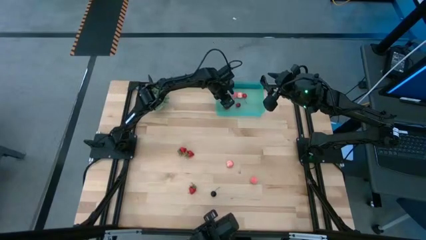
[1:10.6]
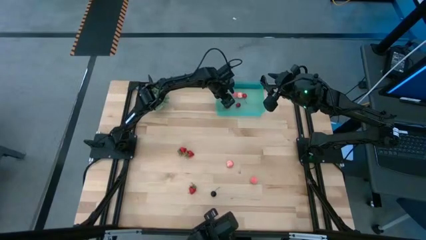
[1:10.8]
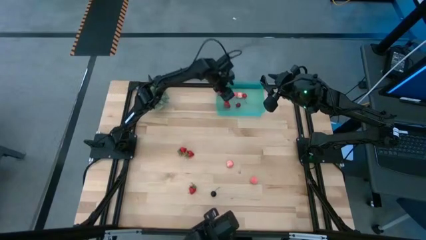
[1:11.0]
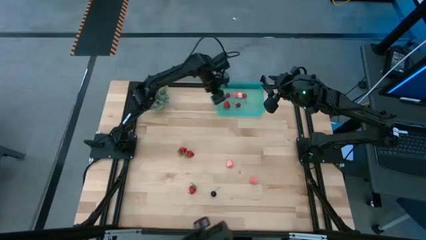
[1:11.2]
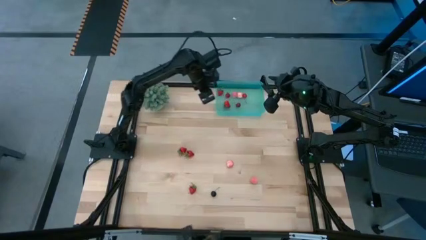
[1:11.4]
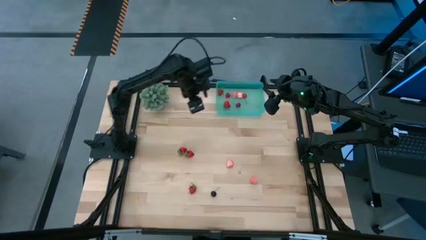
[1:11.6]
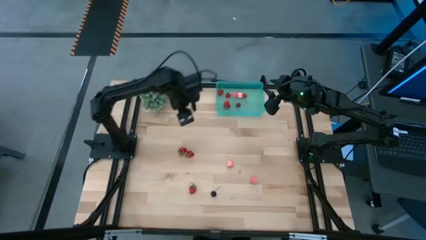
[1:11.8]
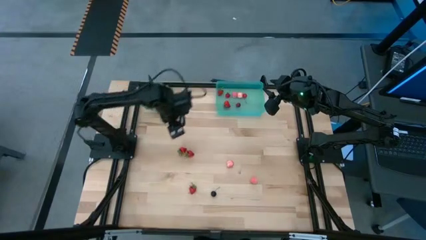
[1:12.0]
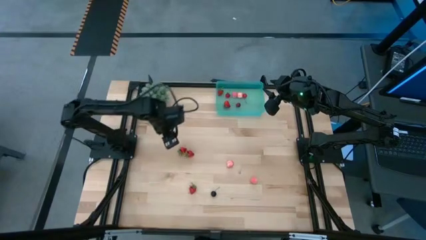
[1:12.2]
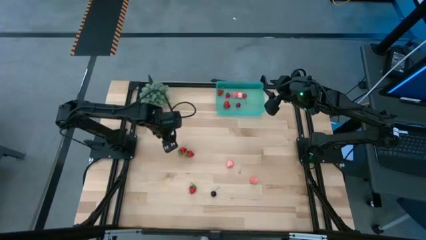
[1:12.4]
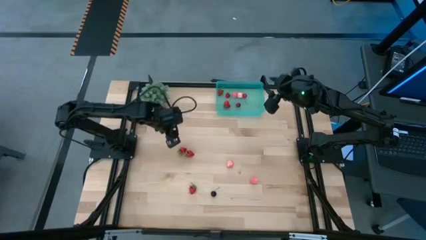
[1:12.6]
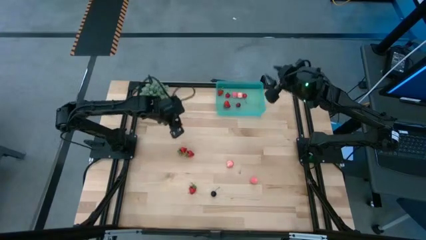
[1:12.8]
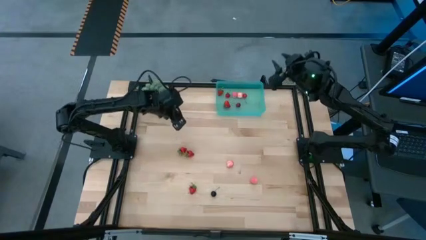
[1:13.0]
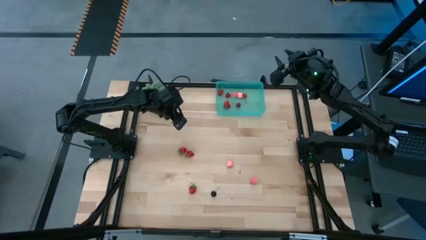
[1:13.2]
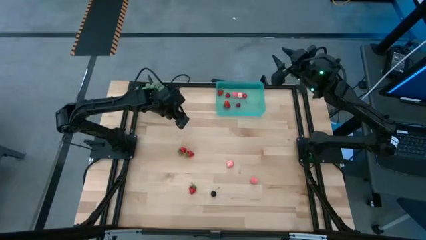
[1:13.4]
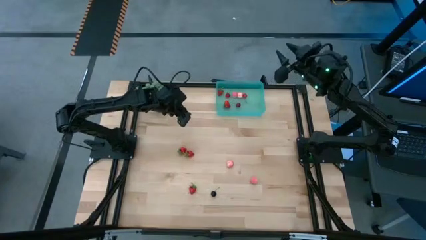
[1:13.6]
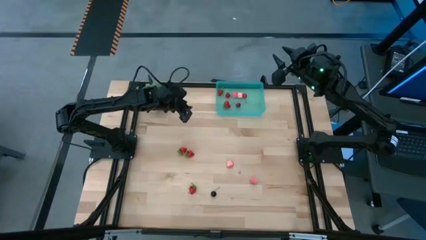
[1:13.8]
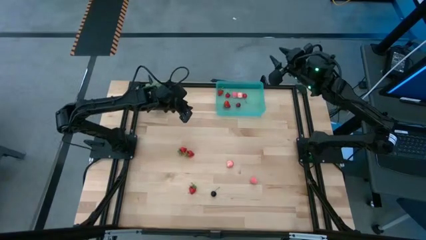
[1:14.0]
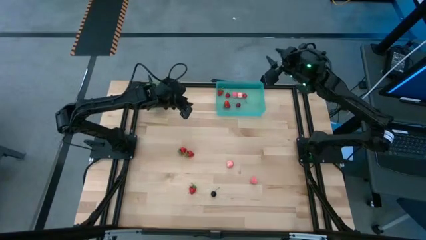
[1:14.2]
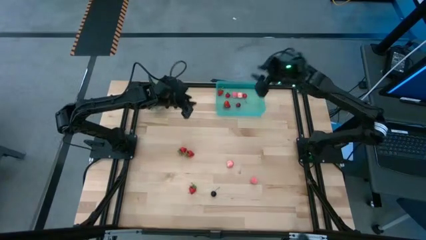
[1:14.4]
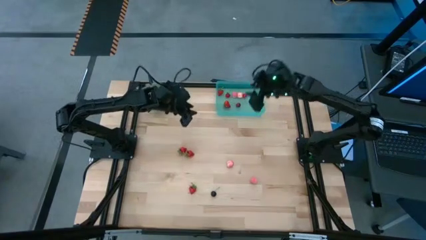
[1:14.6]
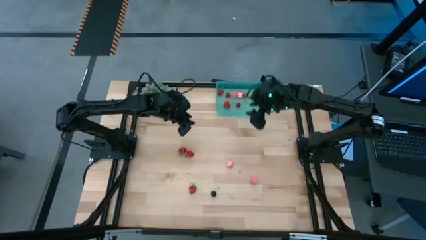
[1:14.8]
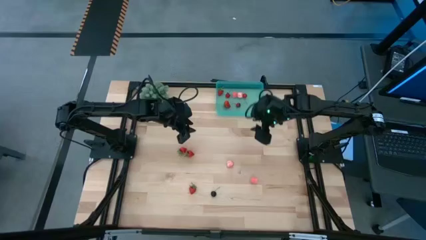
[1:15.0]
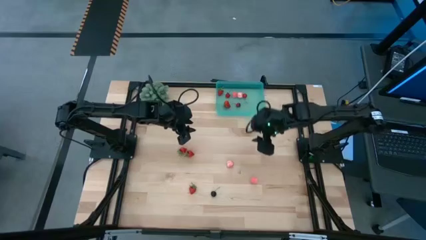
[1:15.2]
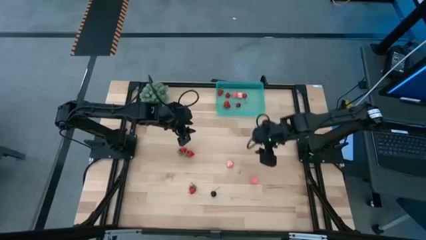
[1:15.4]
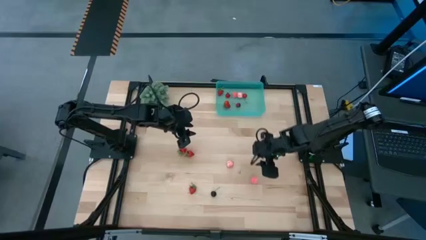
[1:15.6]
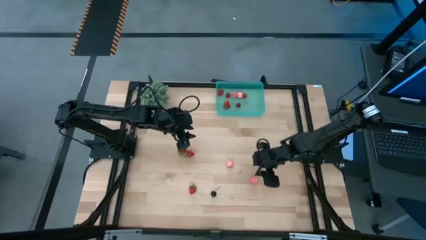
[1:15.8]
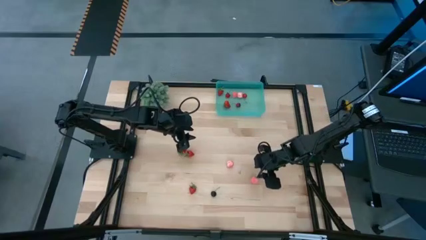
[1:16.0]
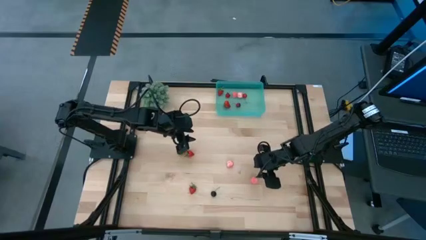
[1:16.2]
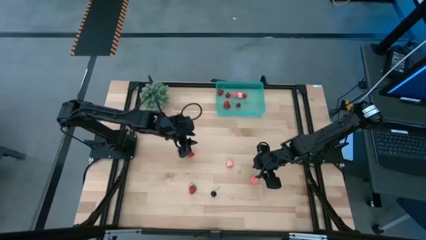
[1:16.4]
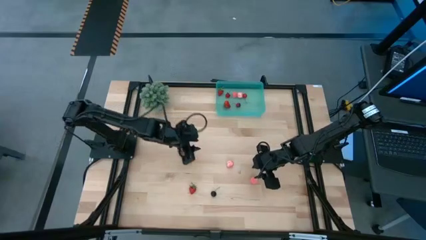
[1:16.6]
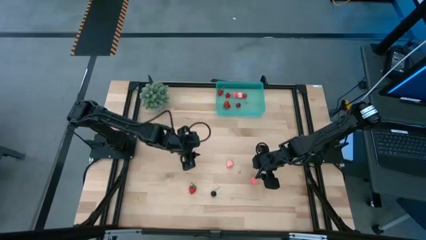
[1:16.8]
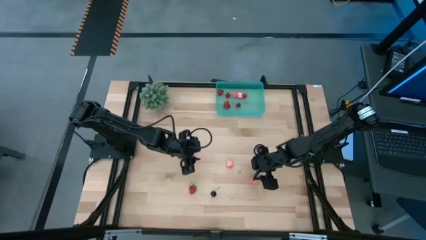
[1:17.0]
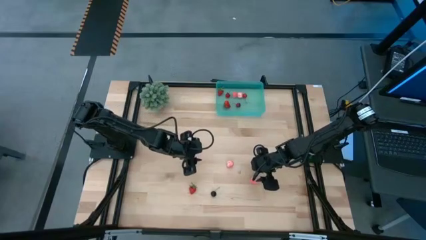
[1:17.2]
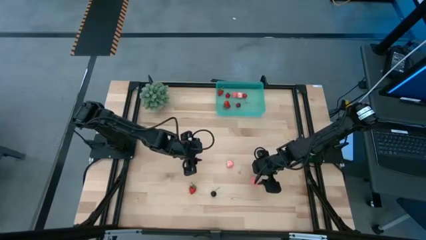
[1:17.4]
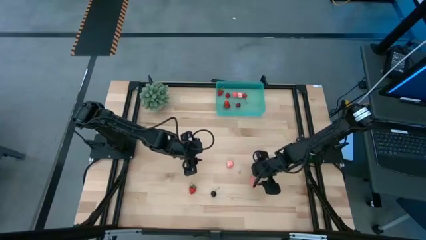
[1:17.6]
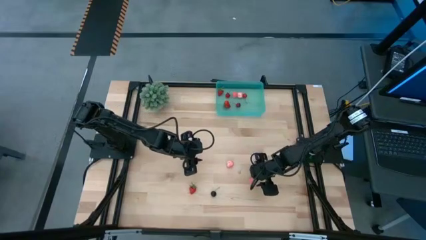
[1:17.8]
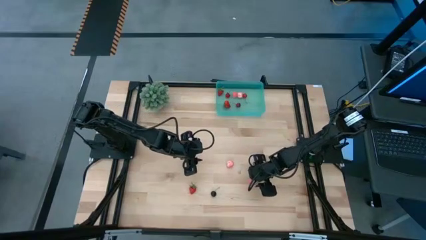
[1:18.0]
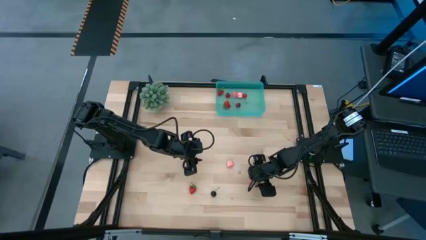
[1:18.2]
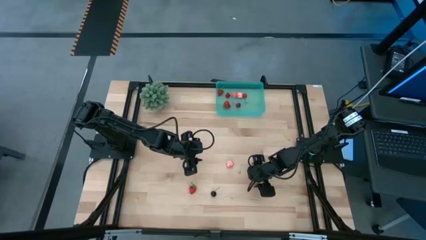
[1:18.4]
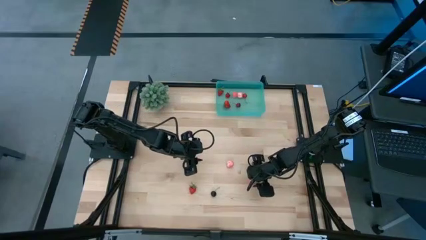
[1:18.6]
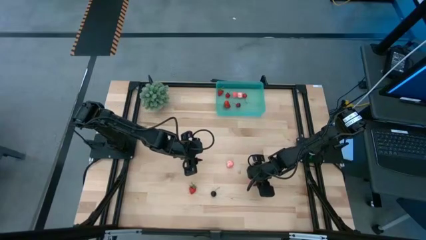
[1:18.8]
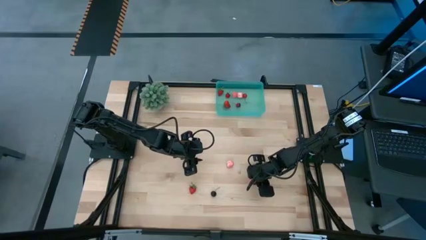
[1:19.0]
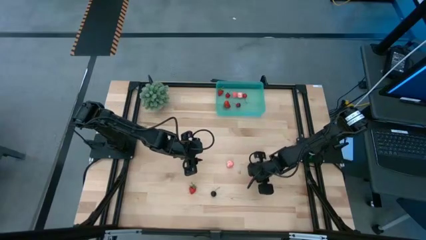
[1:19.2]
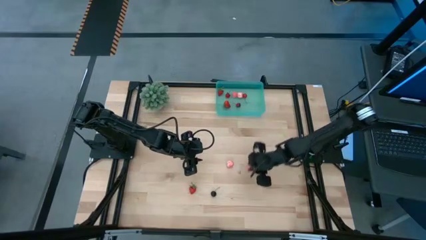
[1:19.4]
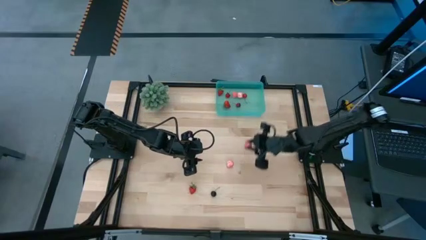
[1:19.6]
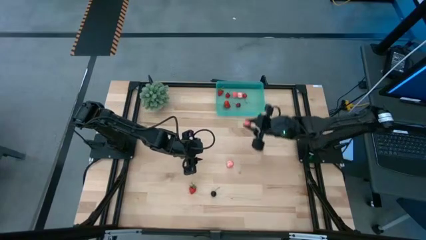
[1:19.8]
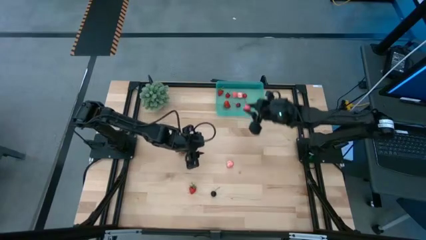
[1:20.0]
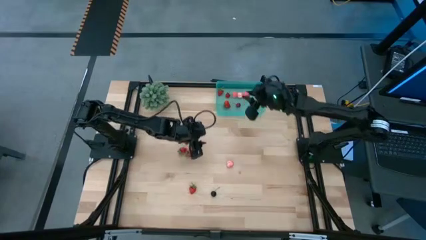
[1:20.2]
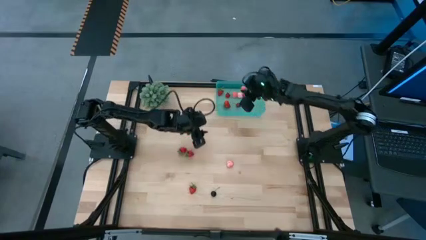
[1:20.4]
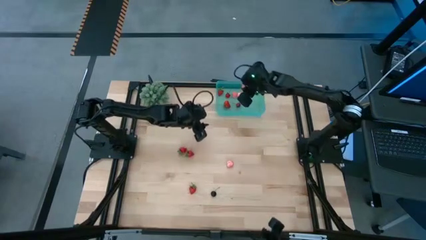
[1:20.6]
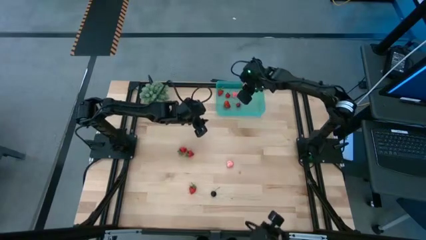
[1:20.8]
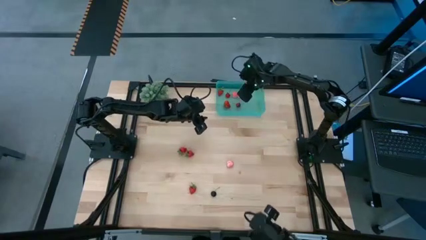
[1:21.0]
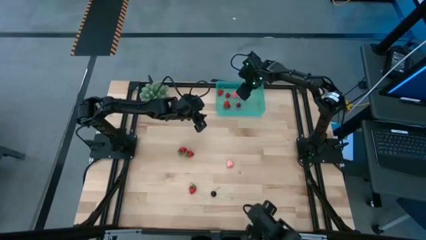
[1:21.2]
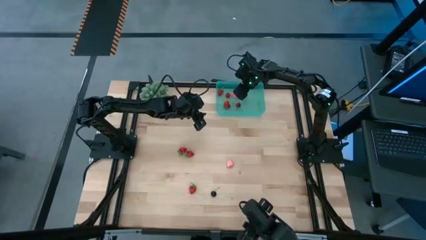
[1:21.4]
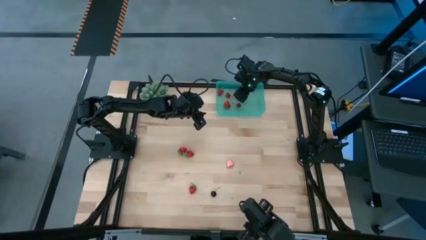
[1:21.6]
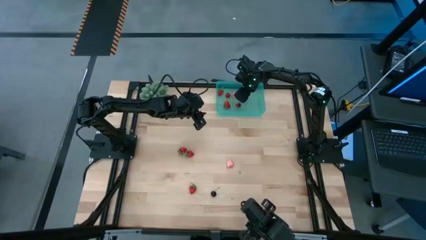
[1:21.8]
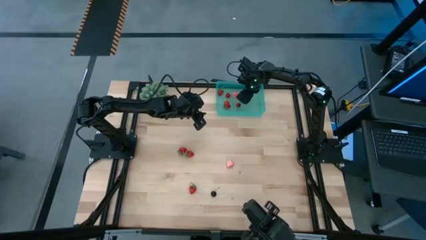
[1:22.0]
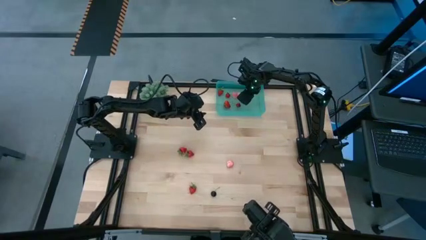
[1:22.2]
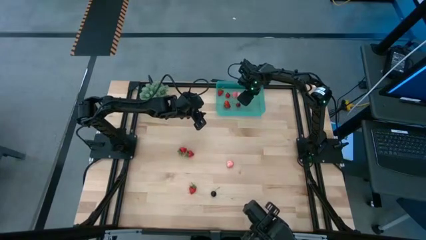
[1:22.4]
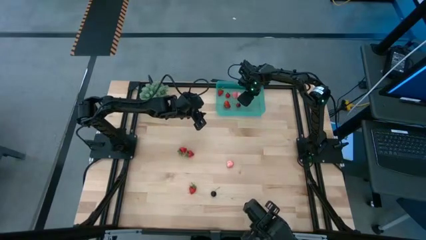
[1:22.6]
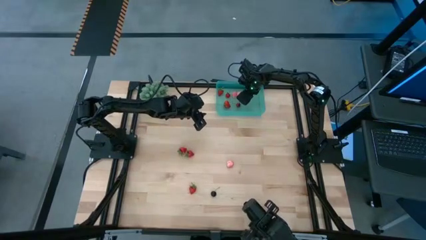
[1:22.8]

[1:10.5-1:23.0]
Task: Pick and placing Produce into tupperware
Put the peach into the blue bin

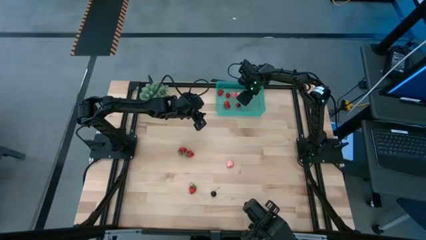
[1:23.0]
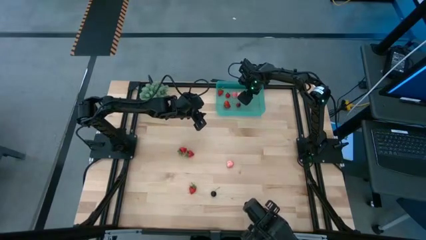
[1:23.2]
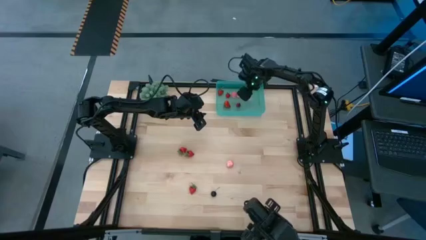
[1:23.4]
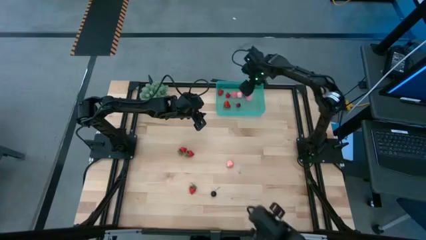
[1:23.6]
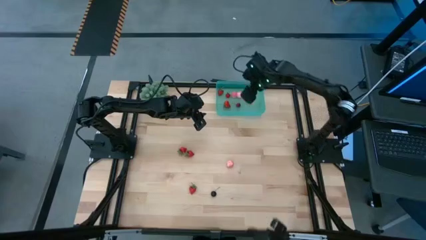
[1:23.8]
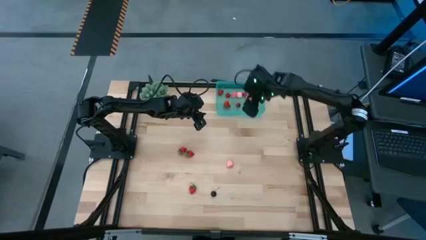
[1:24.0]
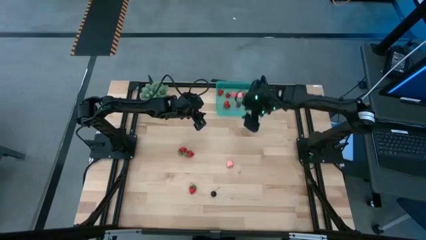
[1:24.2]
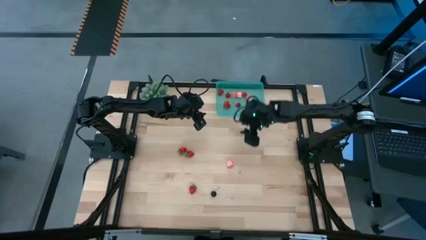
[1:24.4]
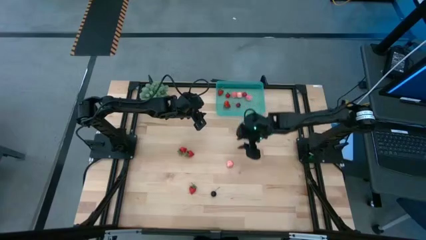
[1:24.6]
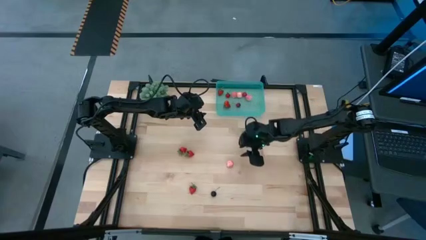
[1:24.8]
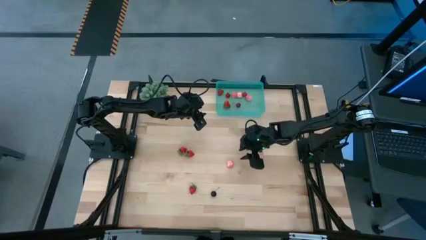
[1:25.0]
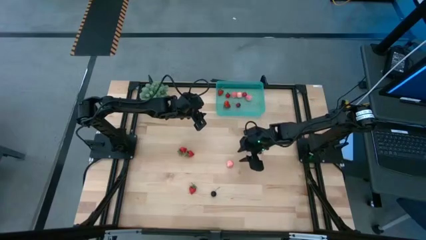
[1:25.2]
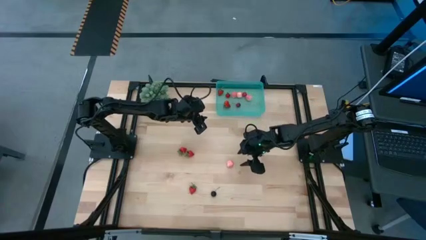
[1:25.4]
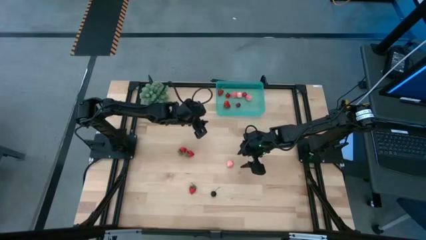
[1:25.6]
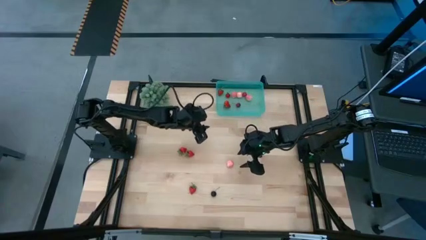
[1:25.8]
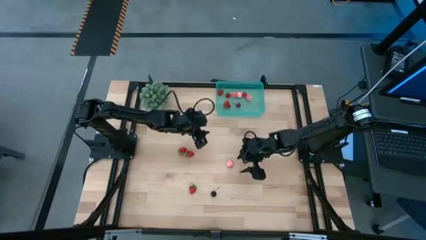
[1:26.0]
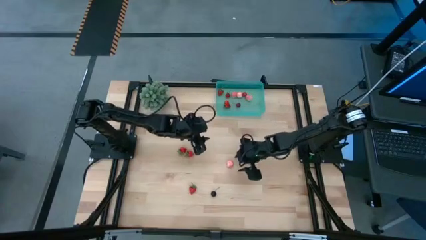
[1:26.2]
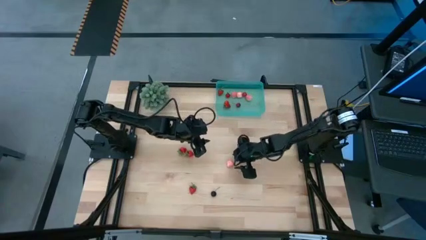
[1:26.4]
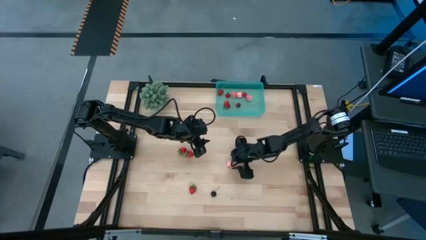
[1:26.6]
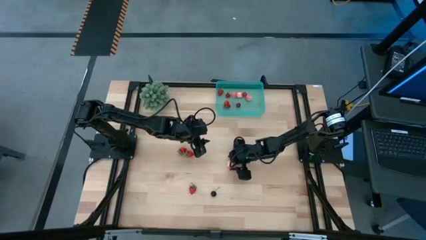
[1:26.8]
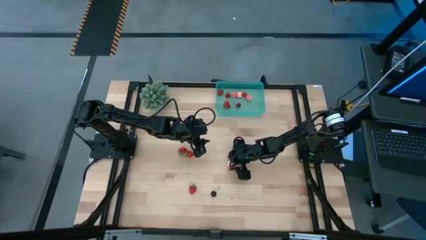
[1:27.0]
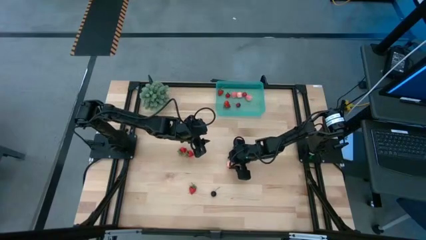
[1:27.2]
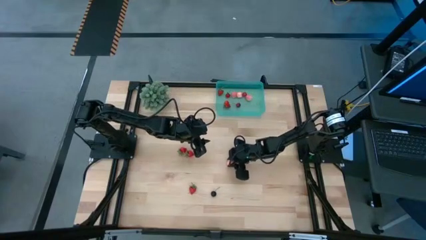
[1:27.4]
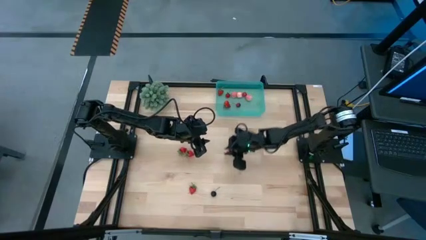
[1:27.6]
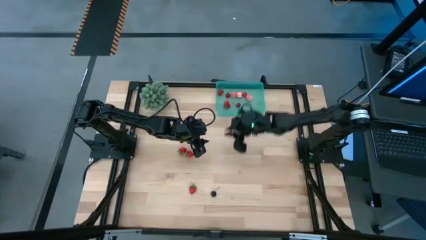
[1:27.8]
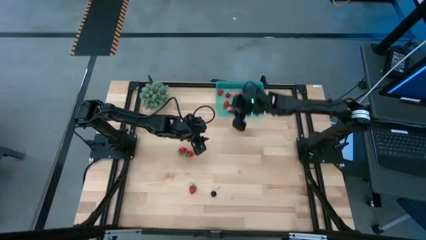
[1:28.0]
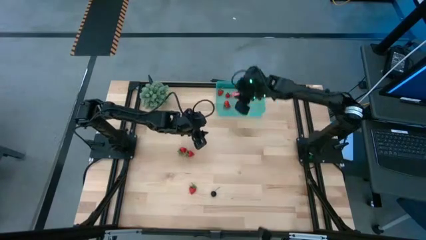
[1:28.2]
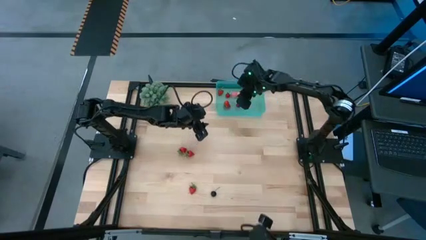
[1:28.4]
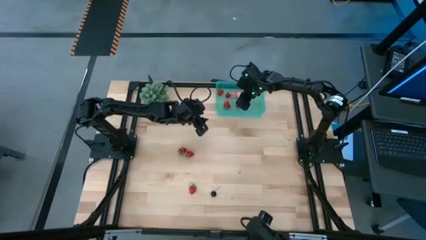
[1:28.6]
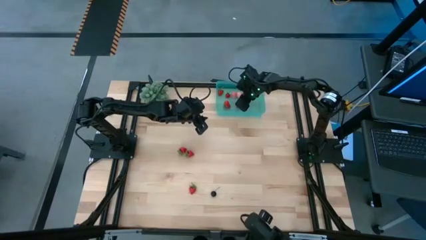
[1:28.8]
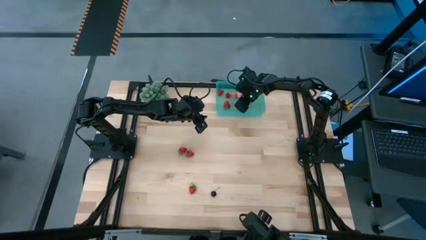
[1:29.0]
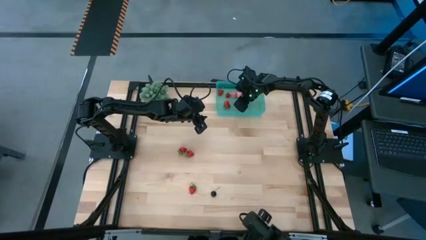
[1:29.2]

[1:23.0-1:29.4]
Put the peach into the blue bin
